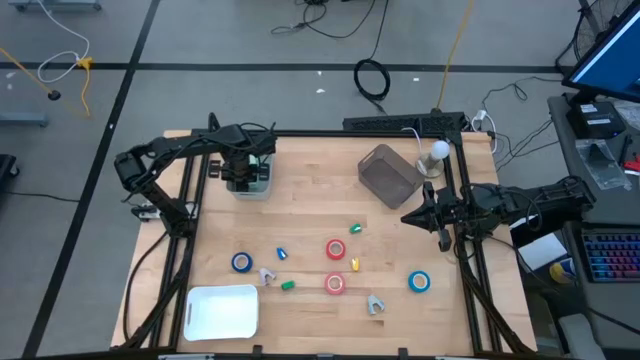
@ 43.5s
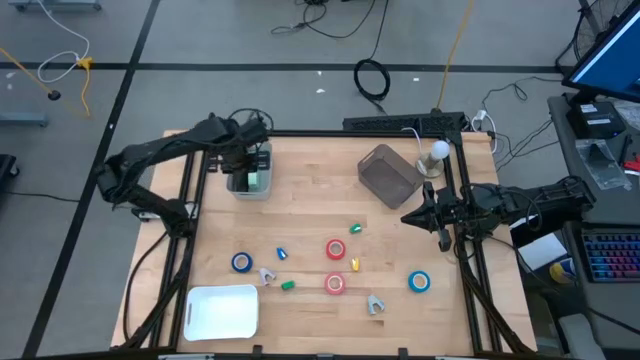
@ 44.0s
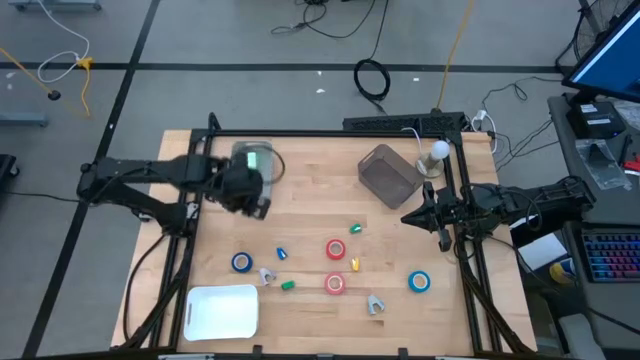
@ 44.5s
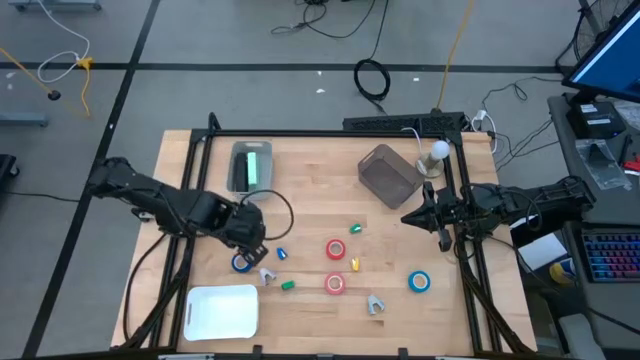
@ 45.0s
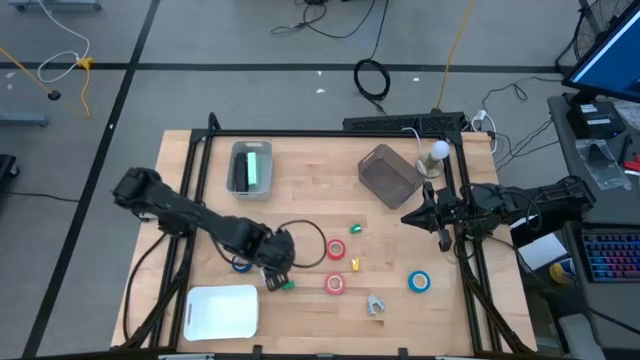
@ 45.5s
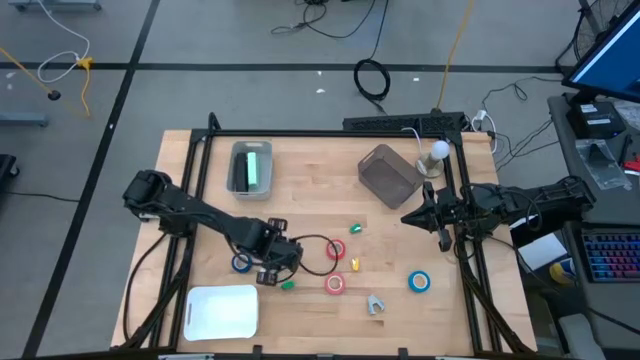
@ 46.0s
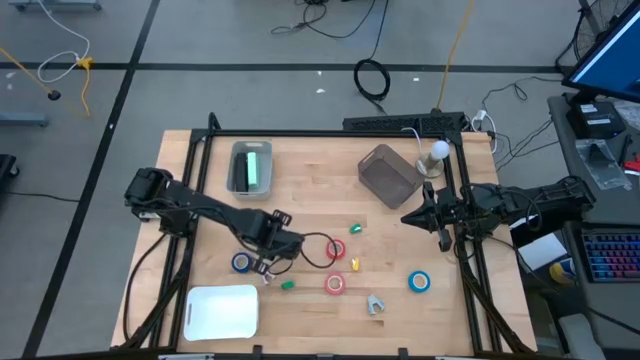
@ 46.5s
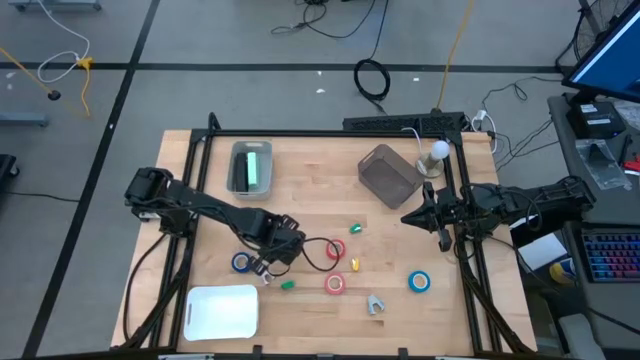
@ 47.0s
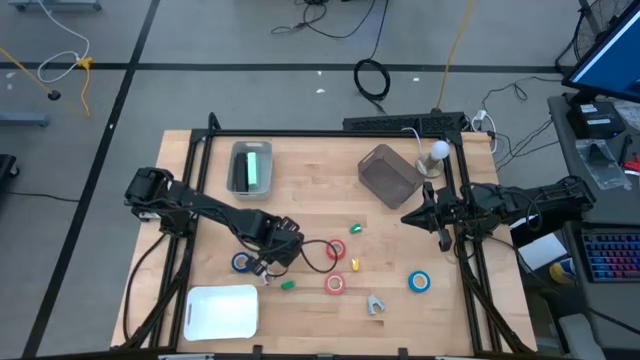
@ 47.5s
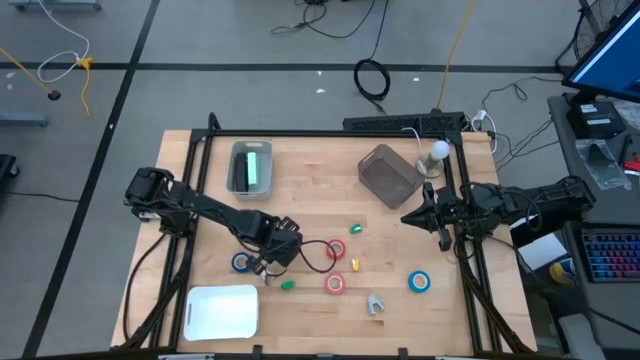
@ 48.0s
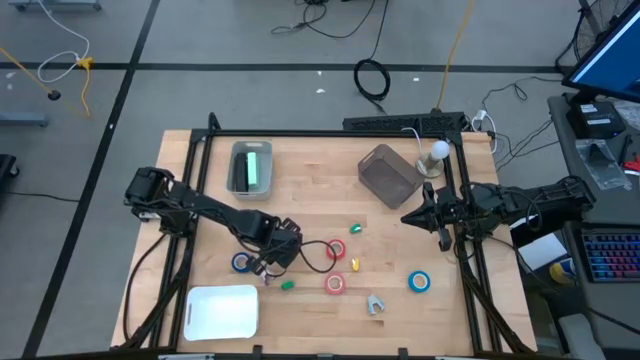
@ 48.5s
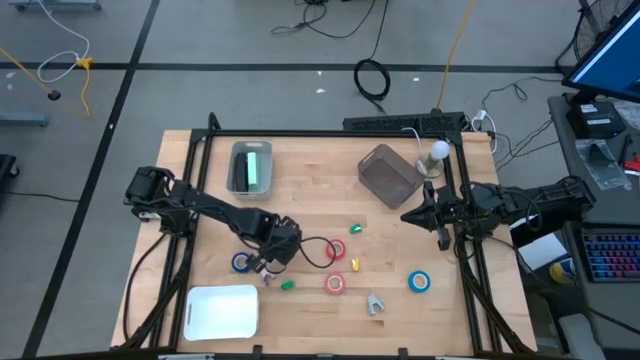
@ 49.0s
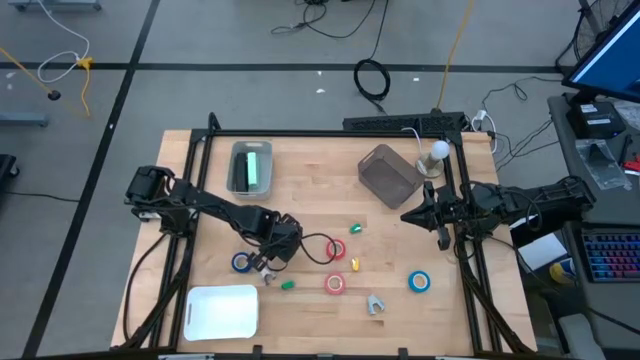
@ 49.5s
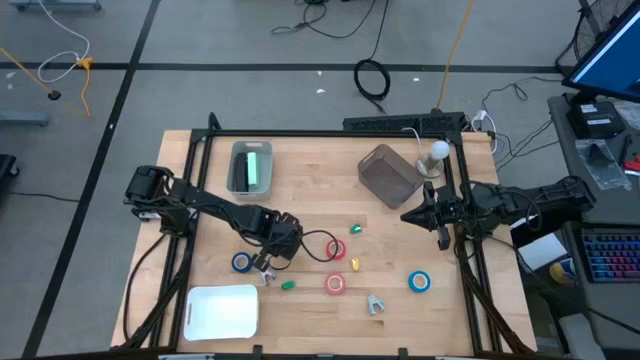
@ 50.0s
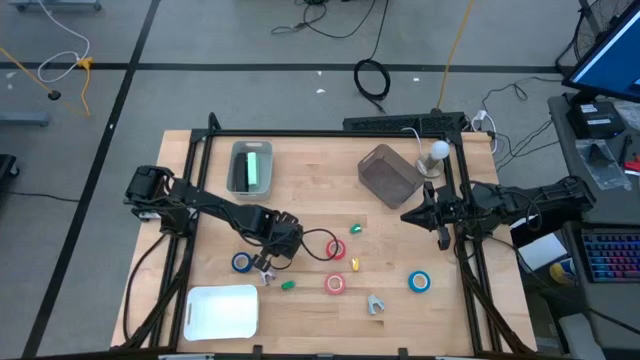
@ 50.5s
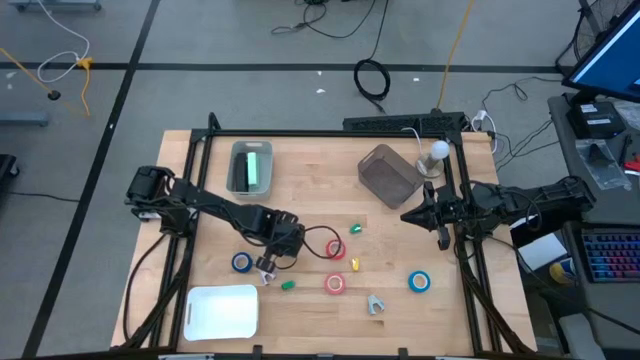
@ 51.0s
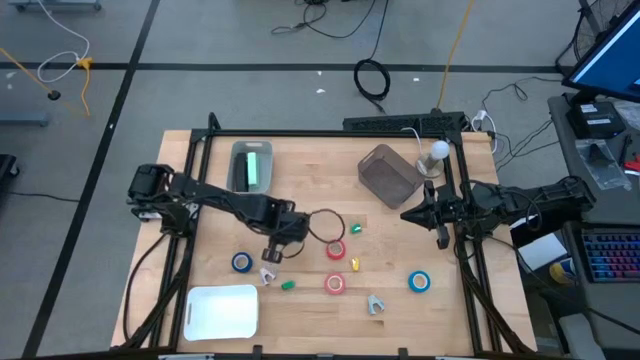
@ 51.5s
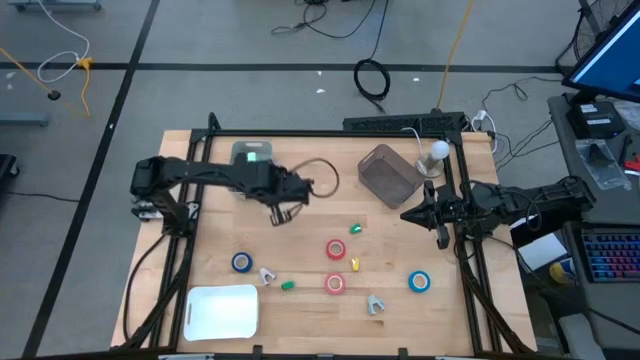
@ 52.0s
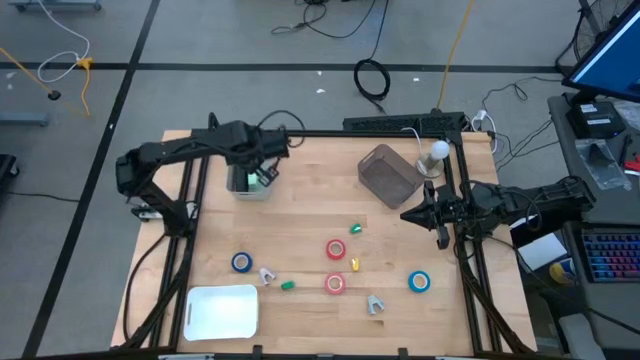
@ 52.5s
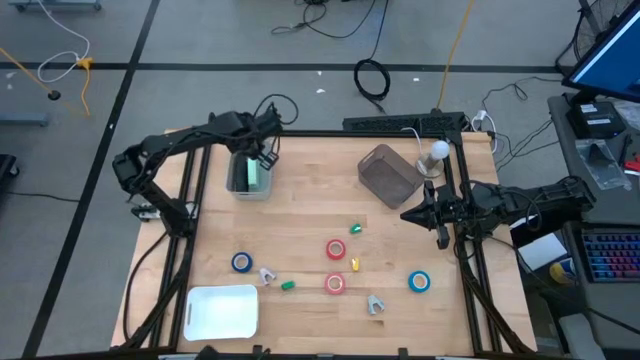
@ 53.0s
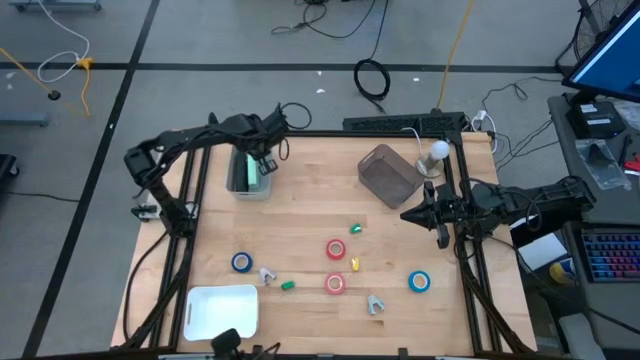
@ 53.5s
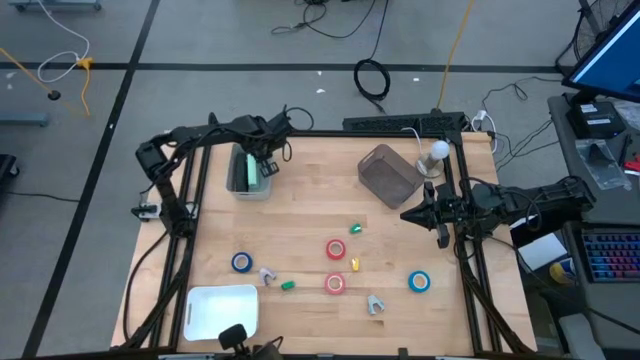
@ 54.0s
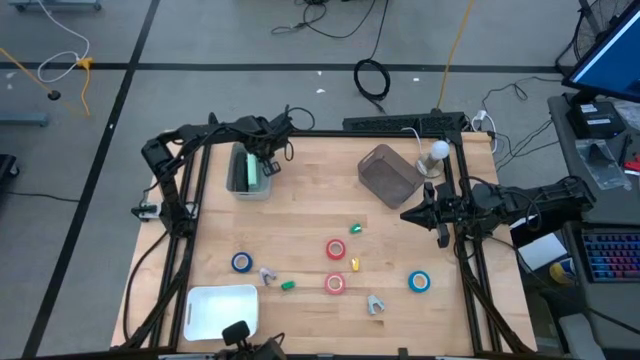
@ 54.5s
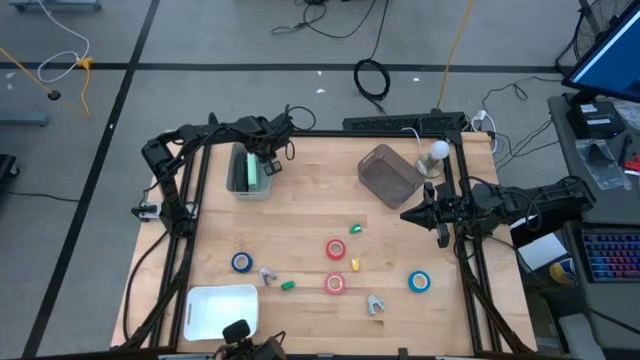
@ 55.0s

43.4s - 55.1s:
Task: Pick and place Stapler, Stapler remover, tape
Put the blue stapler into the gray bin

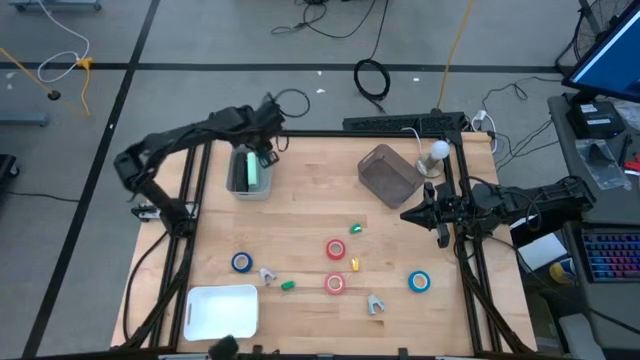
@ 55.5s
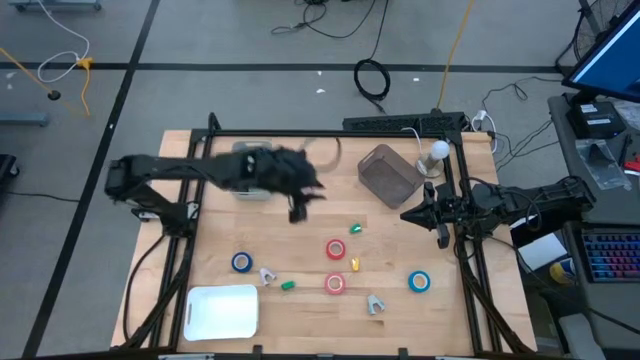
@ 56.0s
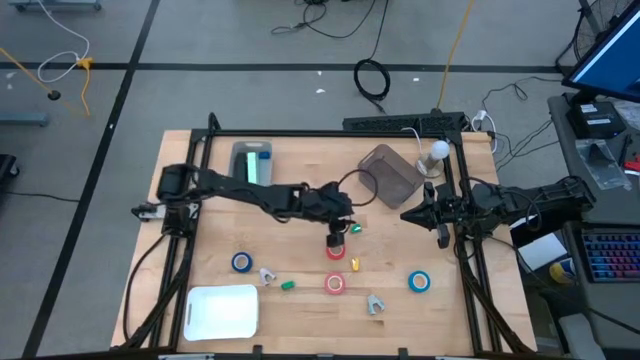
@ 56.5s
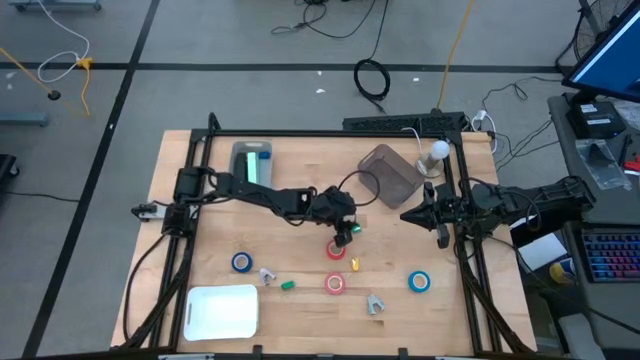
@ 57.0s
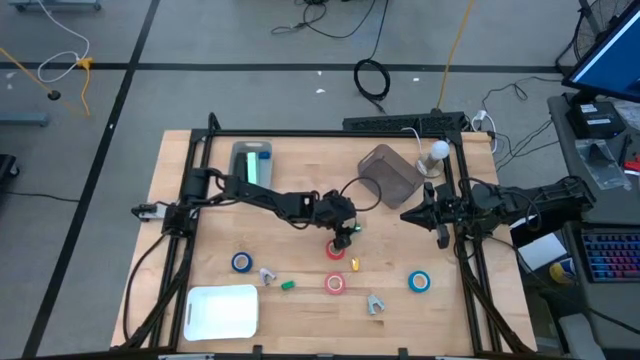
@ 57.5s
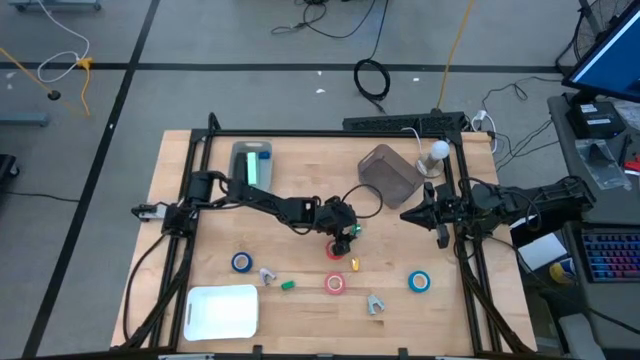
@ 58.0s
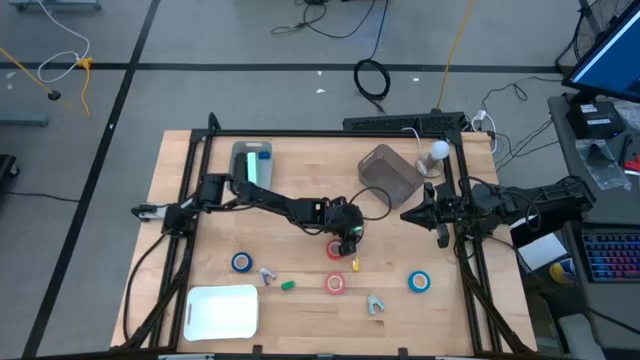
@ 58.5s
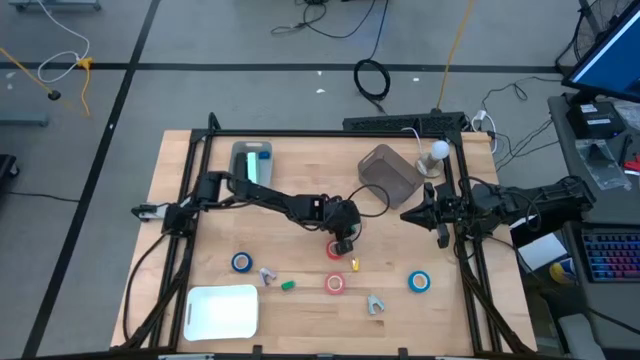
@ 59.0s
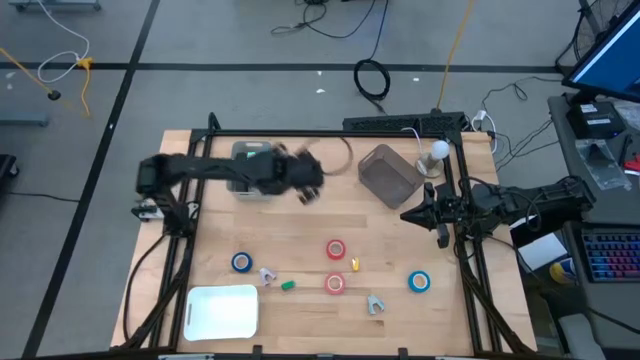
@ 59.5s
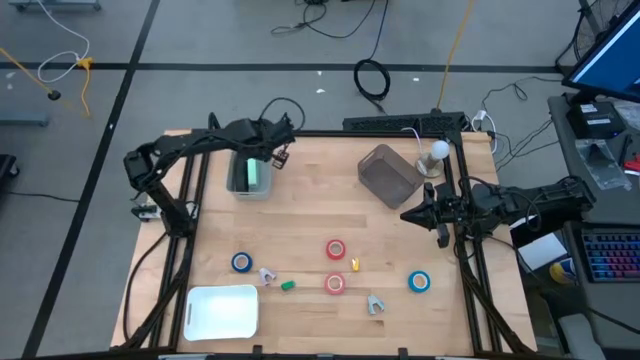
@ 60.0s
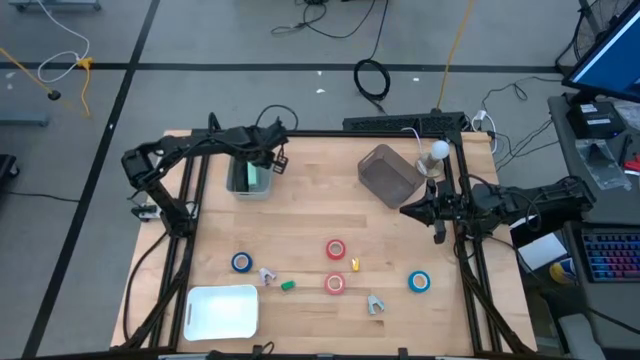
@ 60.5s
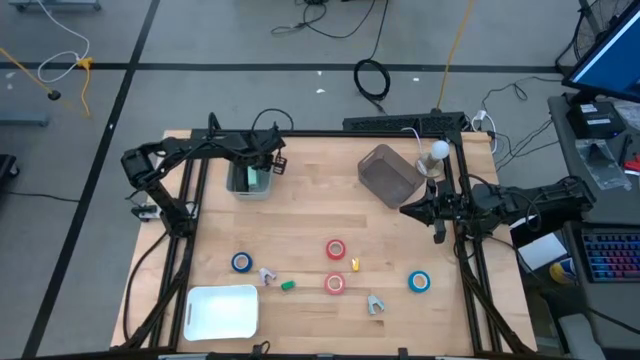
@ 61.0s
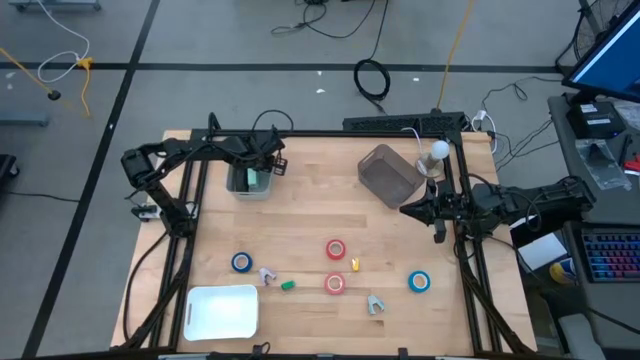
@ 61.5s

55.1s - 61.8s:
Put the top green stapler into the gray bin

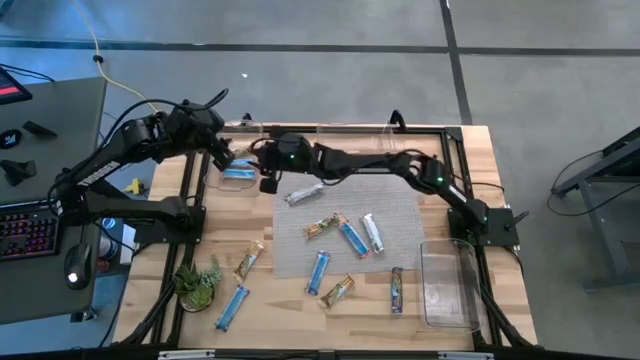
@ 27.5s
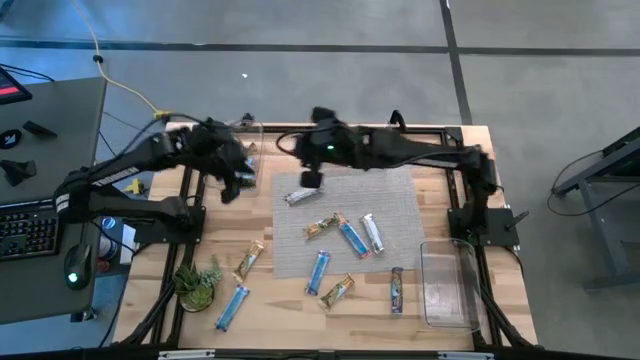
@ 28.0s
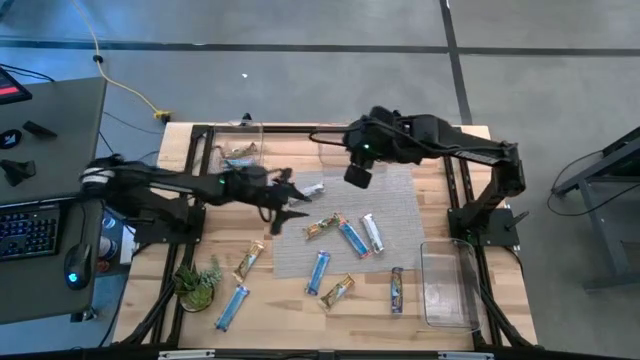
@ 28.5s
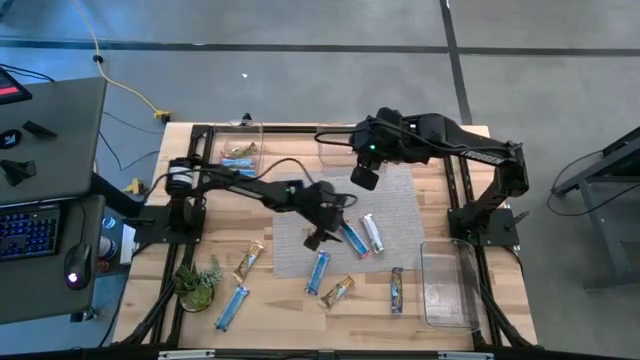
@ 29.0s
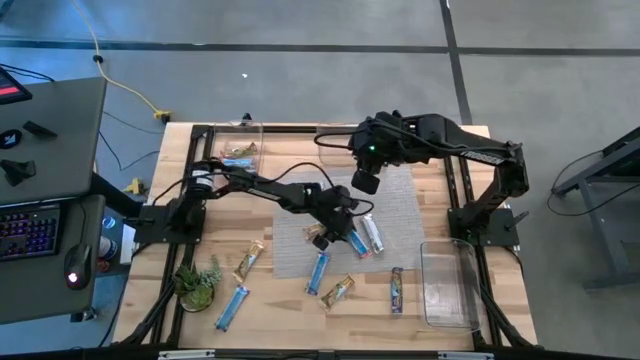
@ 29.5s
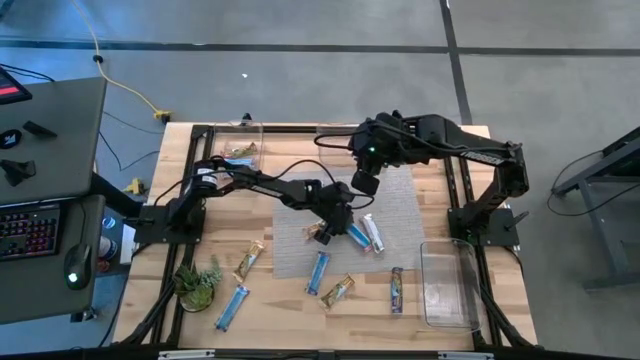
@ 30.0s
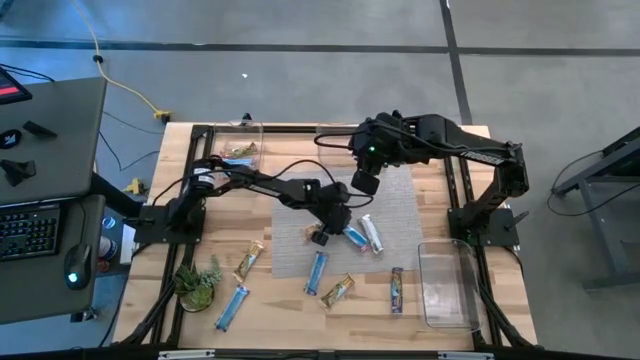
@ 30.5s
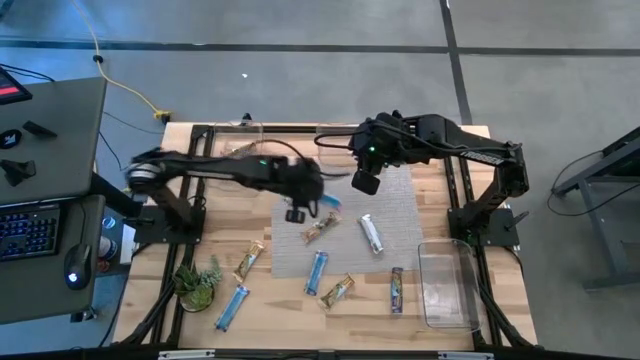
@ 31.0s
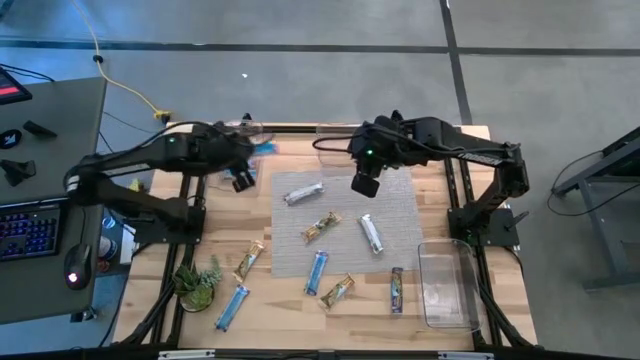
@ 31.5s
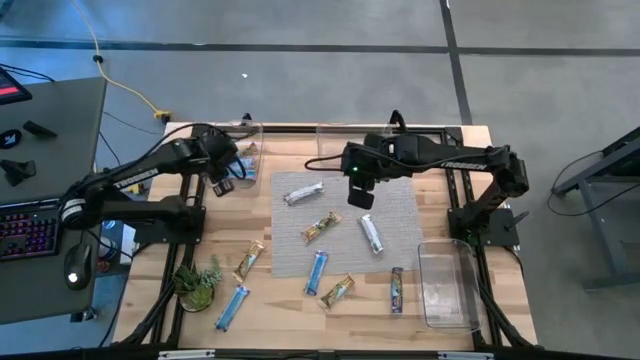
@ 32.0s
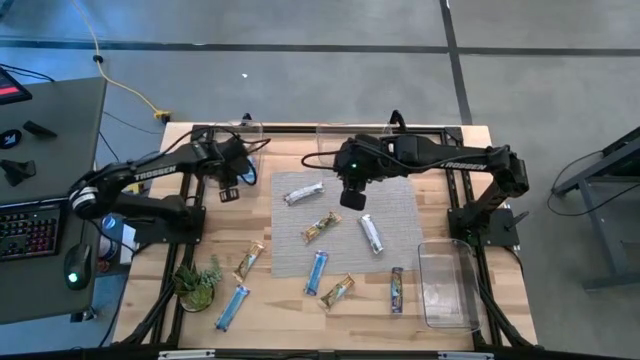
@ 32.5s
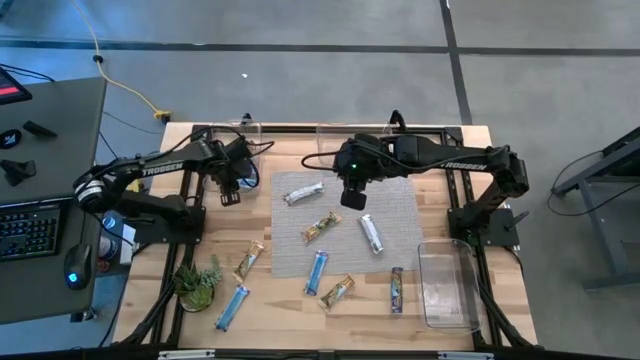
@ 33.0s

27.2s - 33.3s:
Task: Pick and place Granola Bars by type
Put the red granola bar into the top left transparent bin
